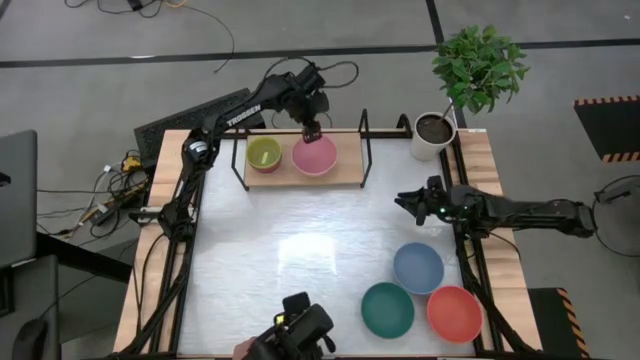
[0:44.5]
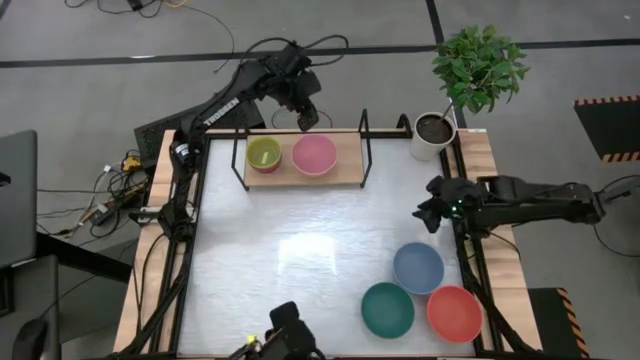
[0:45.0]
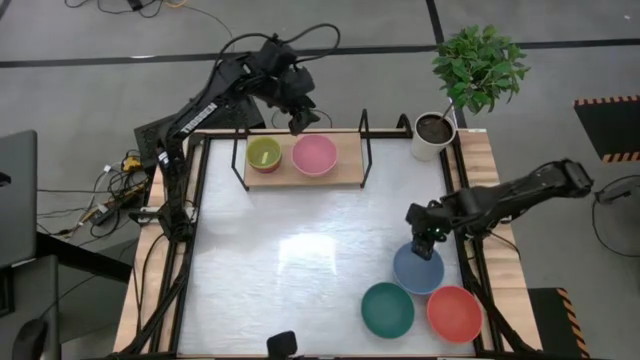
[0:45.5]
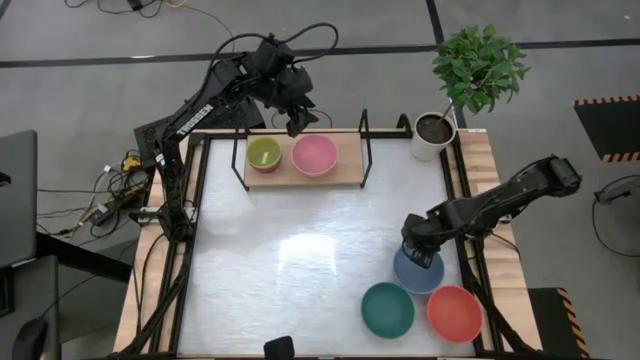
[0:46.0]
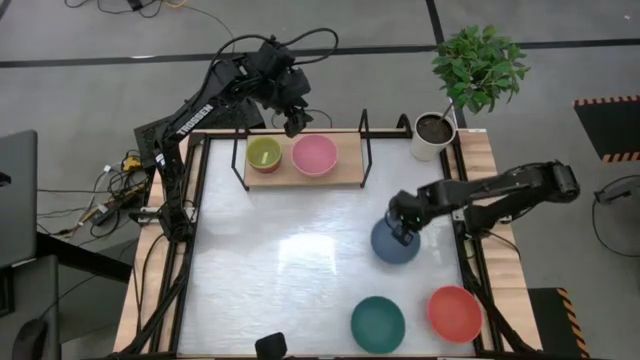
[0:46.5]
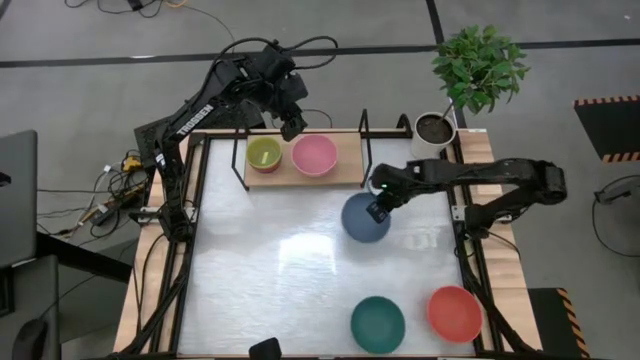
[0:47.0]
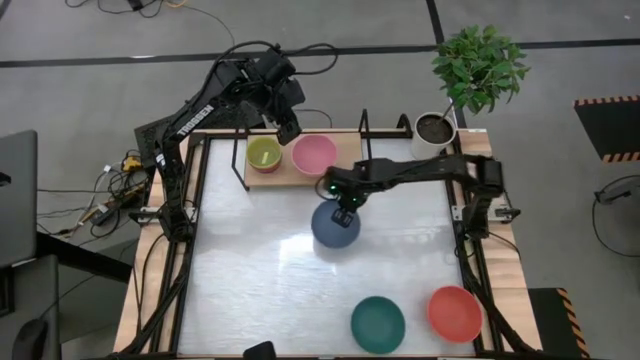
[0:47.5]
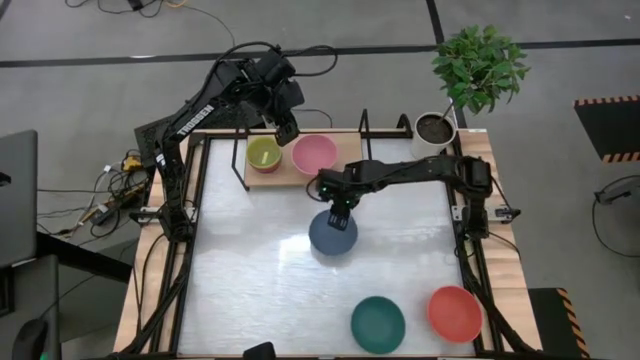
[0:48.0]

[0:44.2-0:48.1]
Task: Place and stack bowls onto a shelf
Move the blue bowl to the center of the table

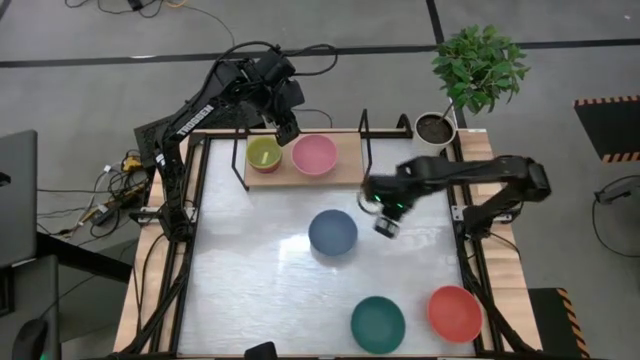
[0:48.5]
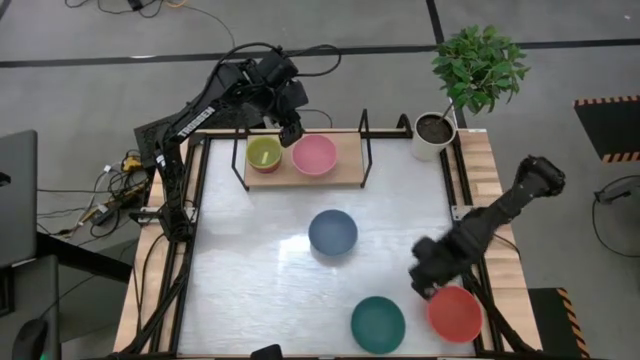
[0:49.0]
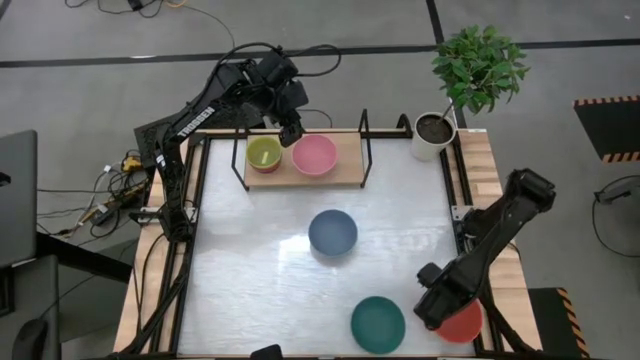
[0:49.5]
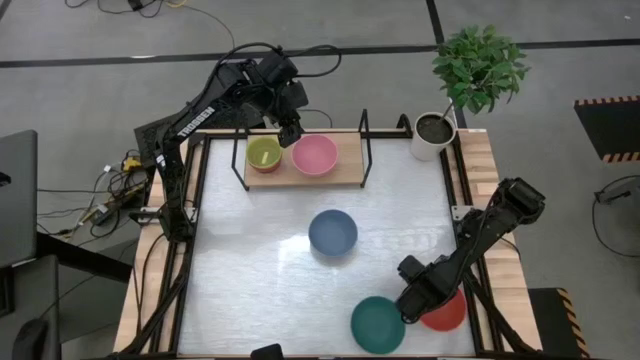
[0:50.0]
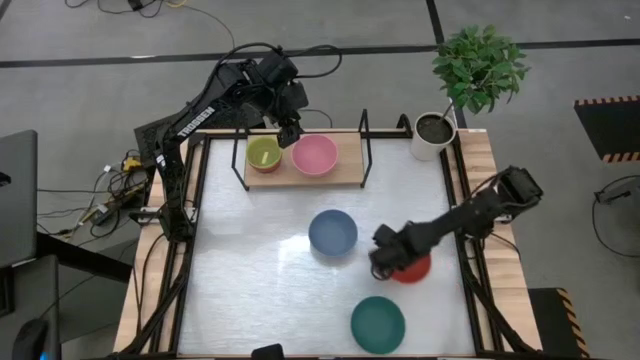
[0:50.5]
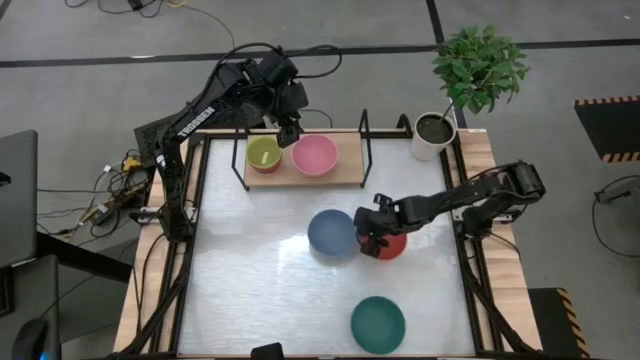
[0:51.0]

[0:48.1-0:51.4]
Move the orange bowl to the center of the table

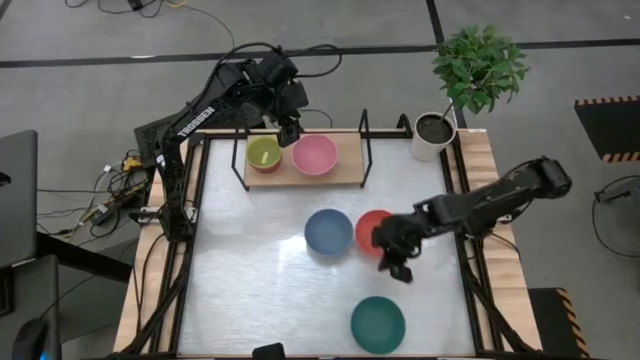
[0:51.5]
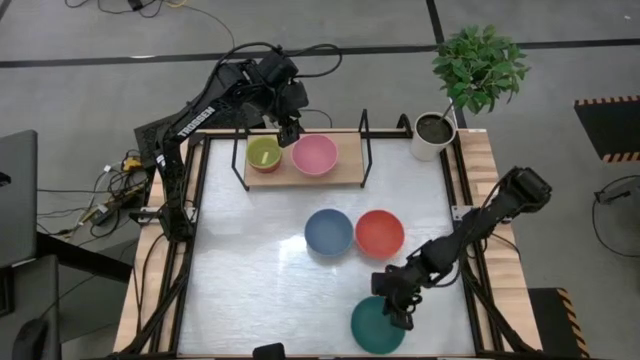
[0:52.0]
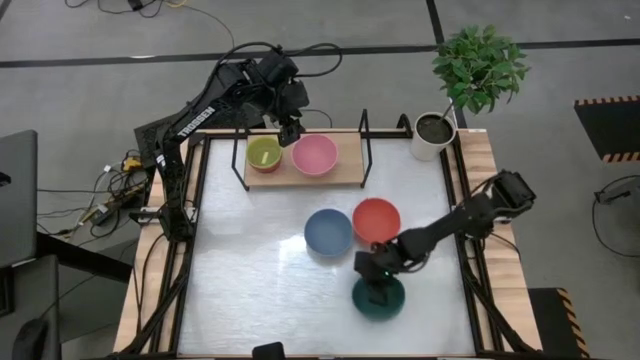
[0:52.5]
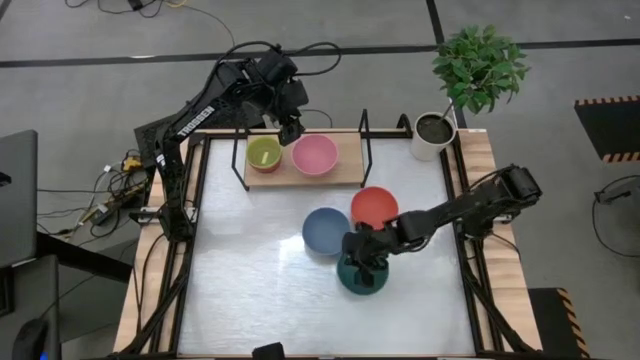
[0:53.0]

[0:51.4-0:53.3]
Move the green bowl to the center of the table

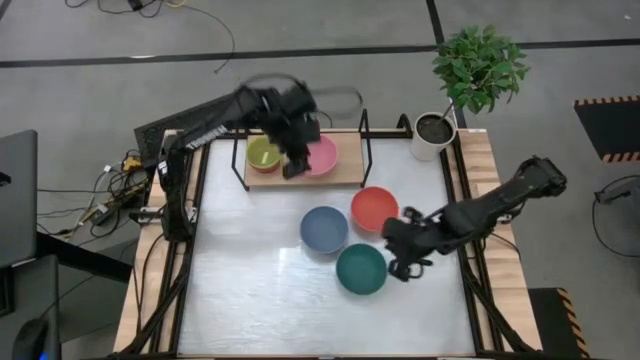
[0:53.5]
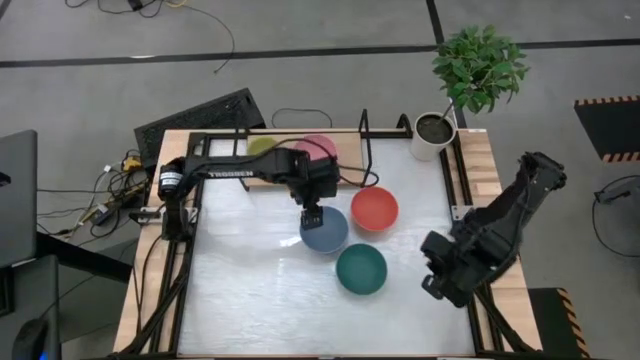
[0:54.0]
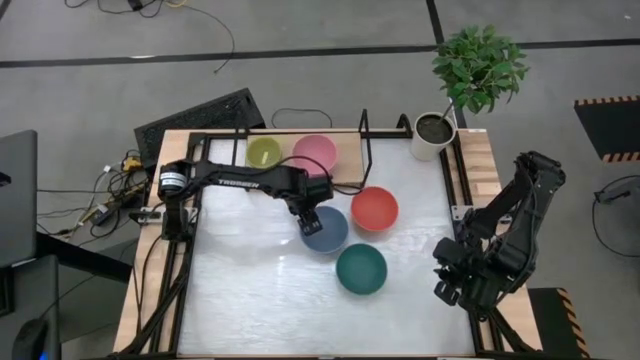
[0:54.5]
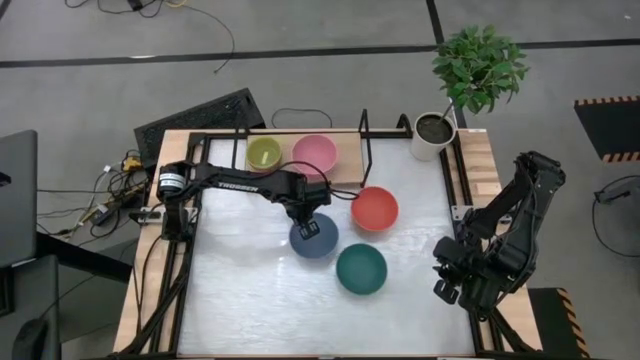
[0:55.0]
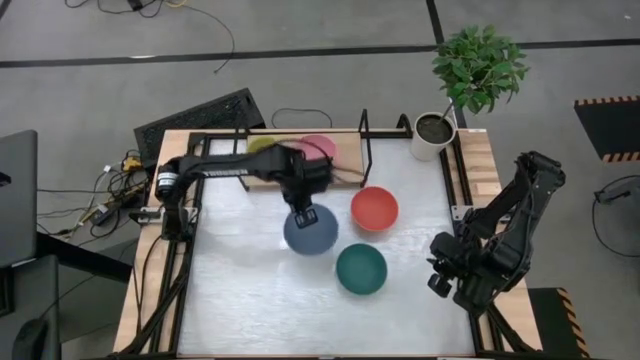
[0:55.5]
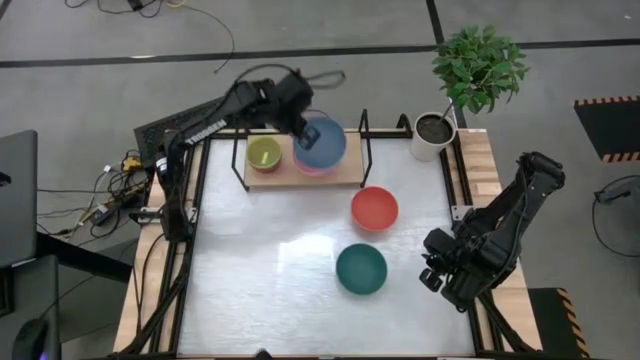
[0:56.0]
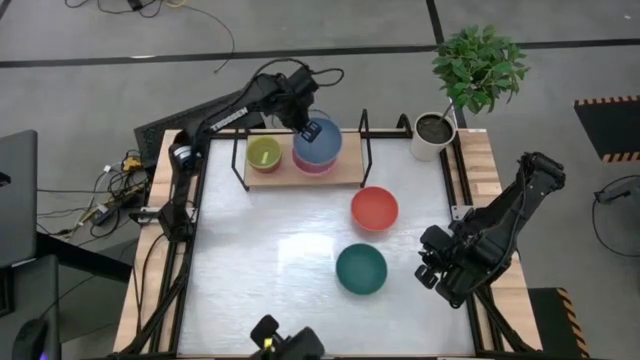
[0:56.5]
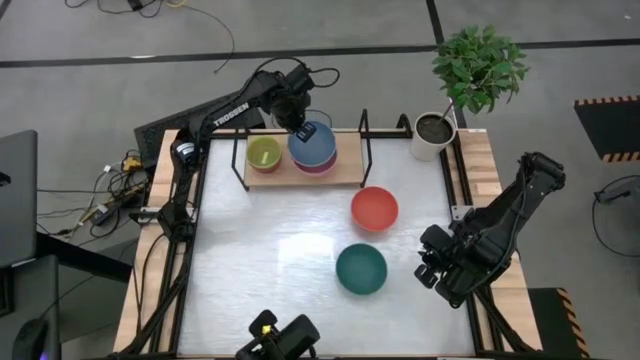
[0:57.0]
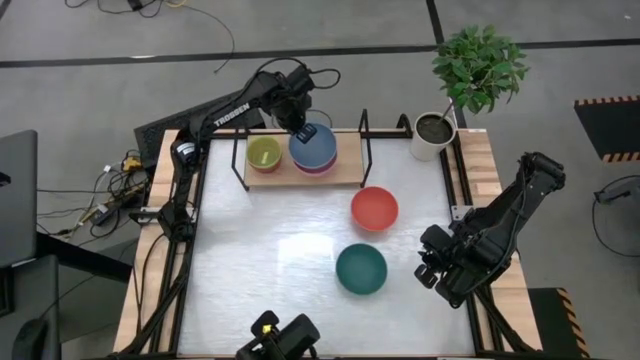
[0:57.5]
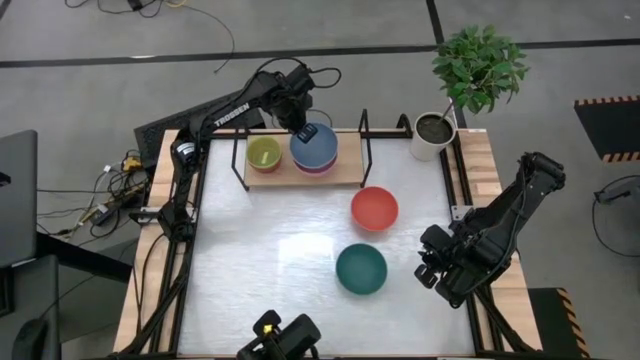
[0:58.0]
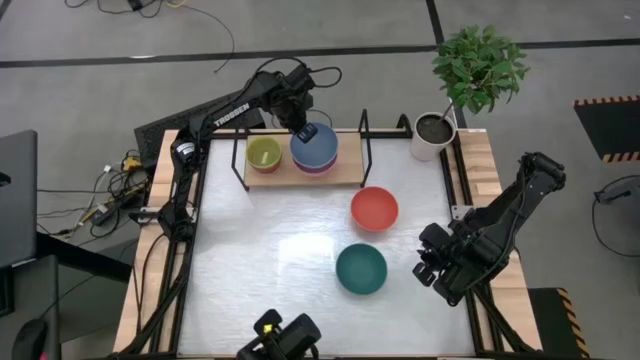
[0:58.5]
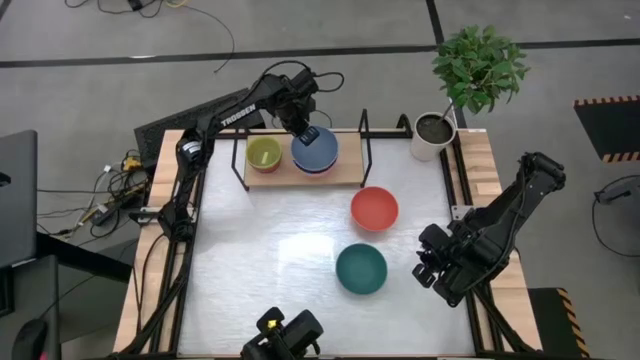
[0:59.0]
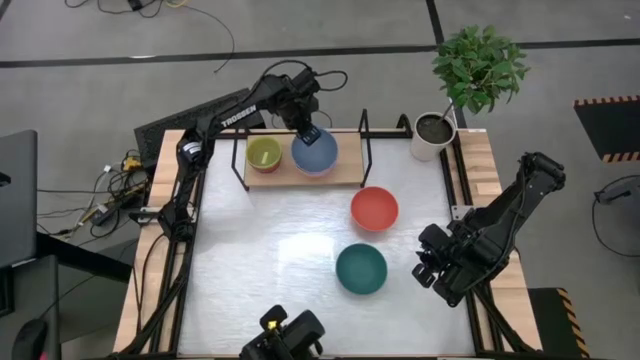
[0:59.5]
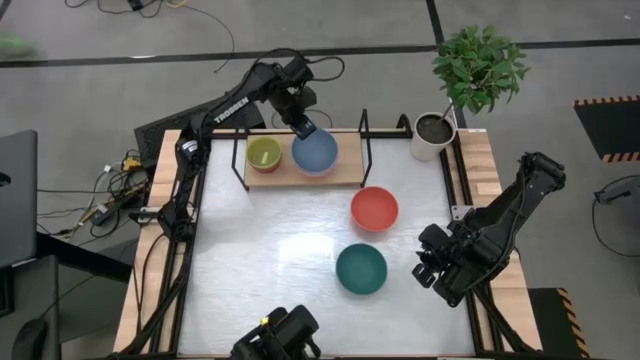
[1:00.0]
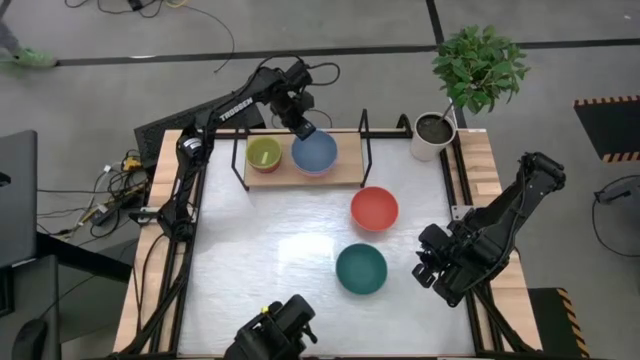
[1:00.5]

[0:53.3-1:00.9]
Stack the blue bowl on top of the pink bowl

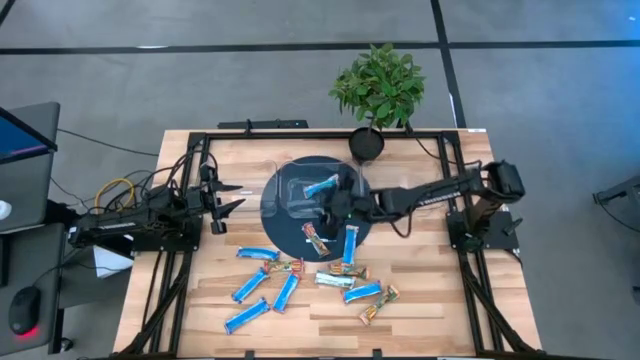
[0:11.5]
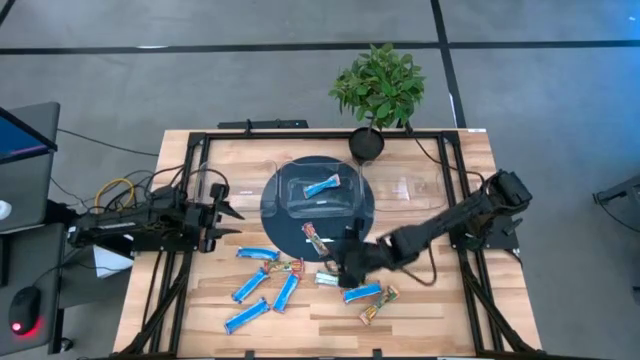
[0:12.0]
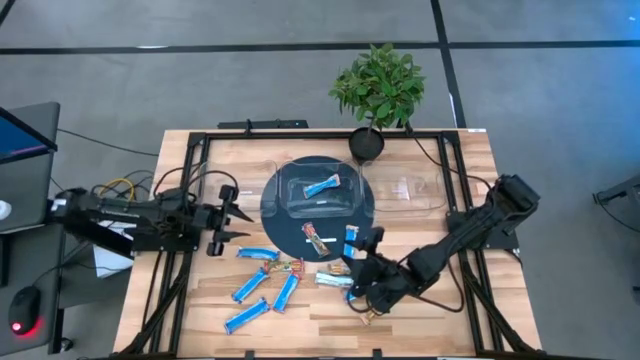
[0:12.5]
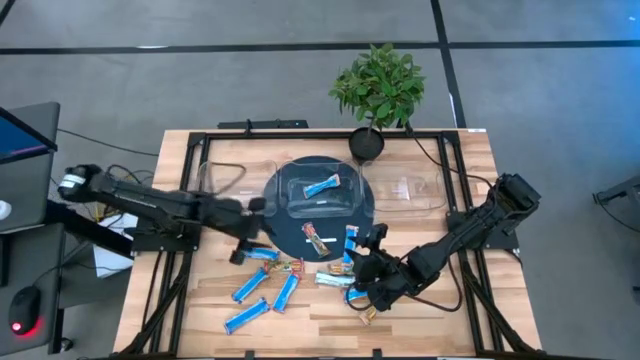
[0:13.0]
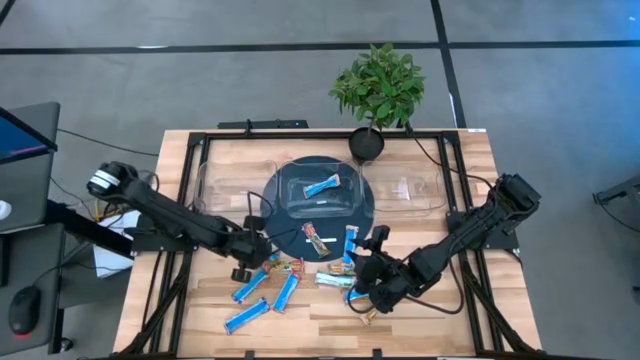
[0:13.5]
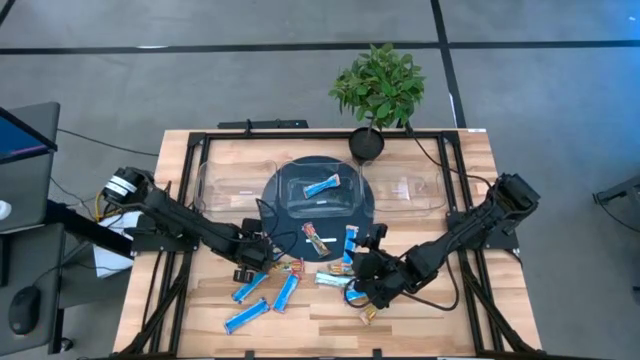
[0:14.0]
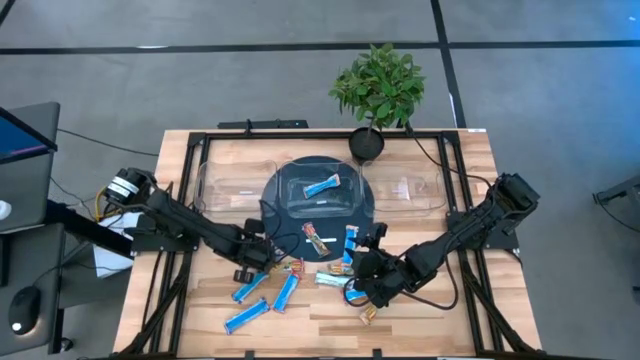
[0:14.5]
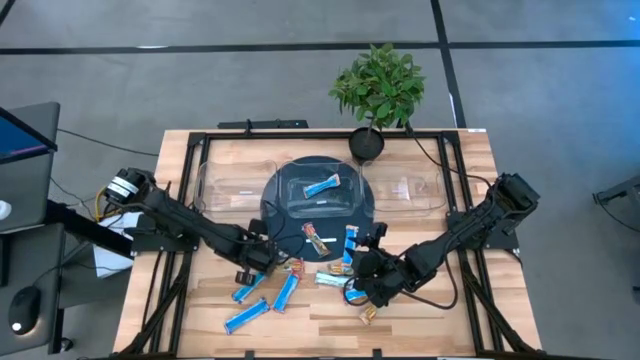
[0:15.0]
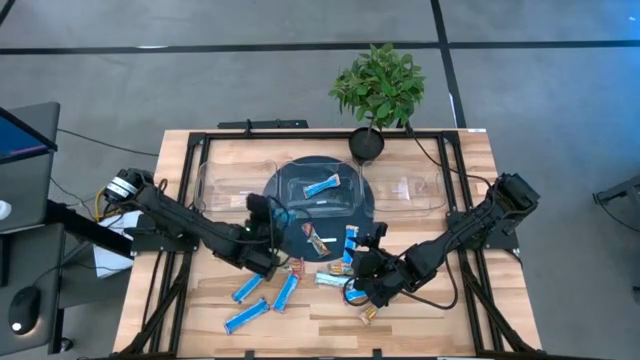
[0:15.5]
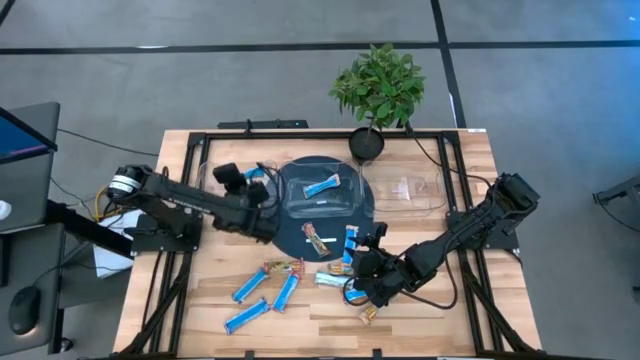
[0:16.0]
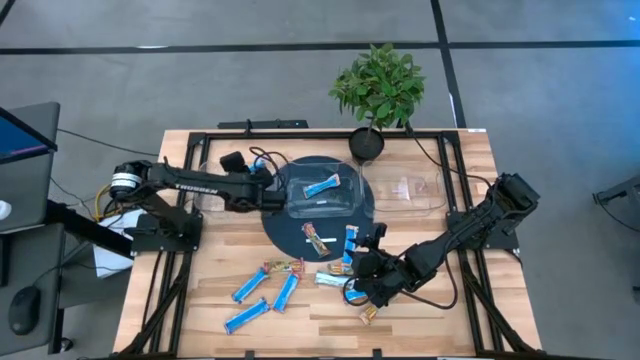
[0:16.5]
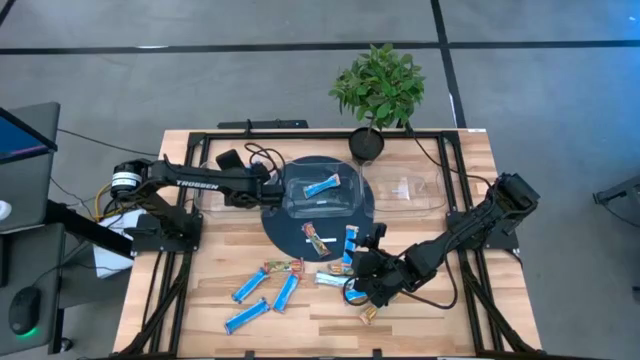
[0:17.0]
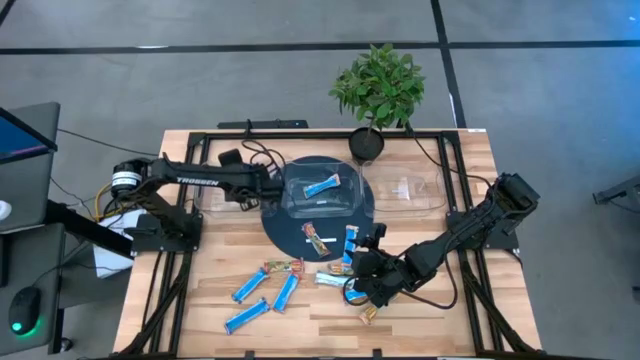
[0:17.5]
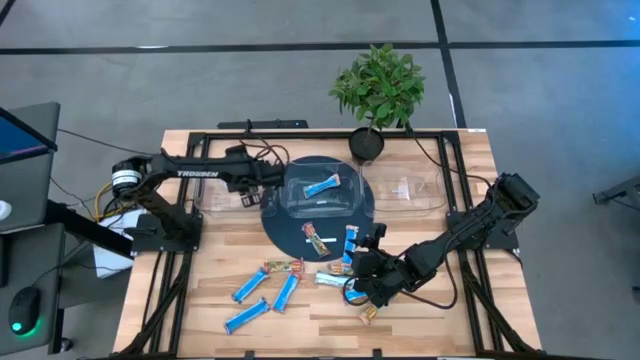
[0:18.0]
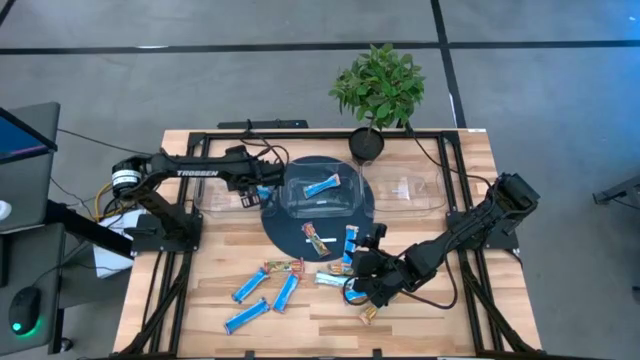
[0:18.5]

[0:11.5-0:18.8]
Task: Pick and place Granola Bars by type
Put the top left blue snack bar into the left transparent bin
